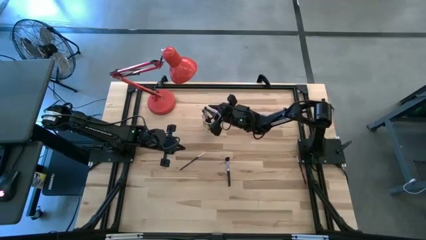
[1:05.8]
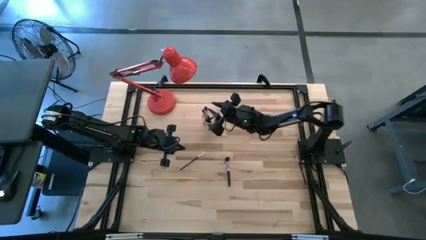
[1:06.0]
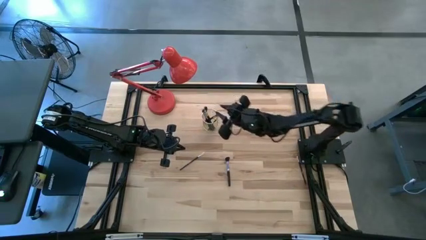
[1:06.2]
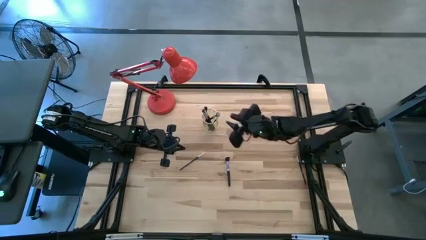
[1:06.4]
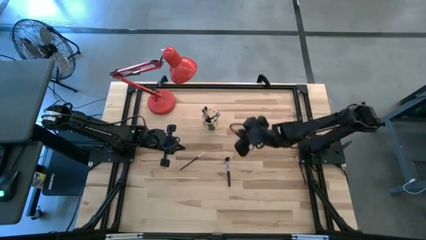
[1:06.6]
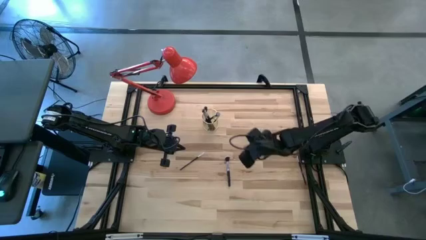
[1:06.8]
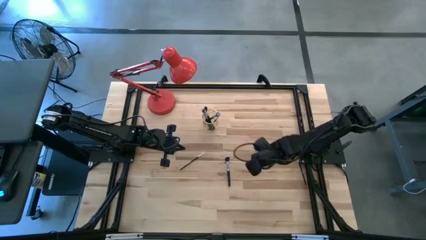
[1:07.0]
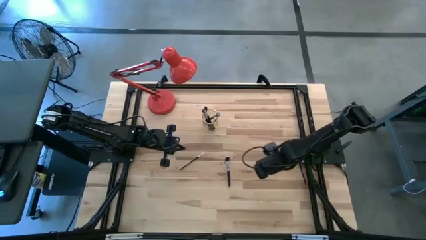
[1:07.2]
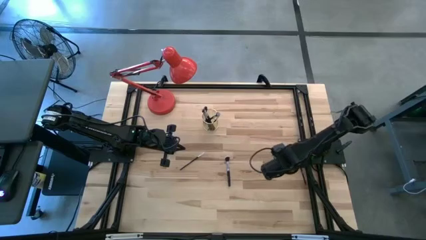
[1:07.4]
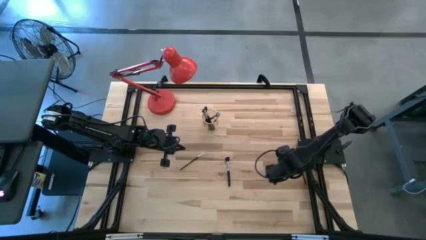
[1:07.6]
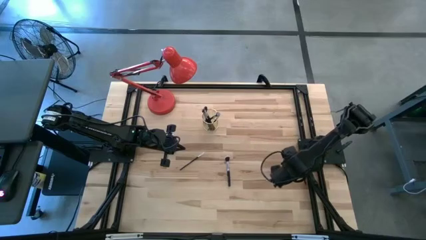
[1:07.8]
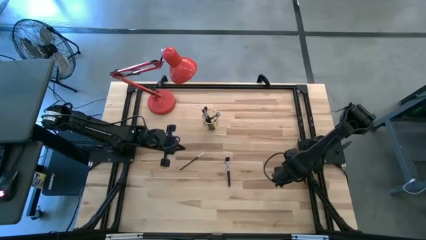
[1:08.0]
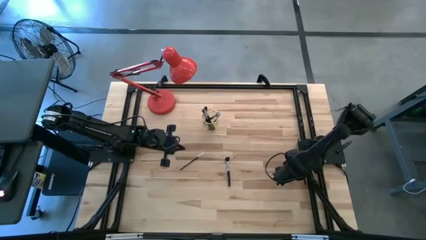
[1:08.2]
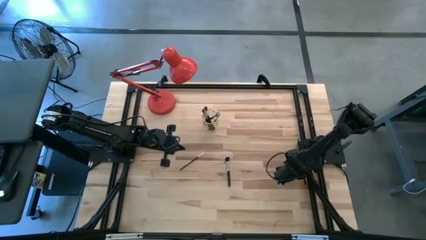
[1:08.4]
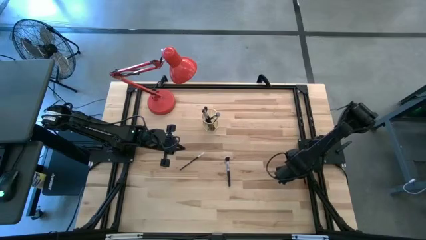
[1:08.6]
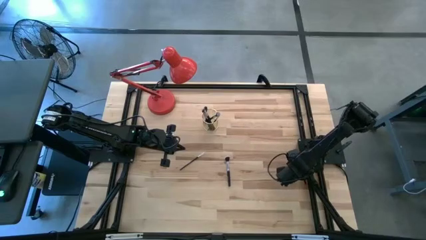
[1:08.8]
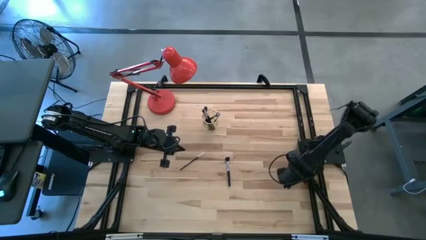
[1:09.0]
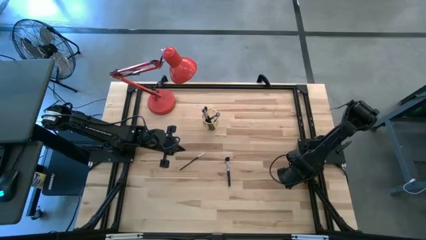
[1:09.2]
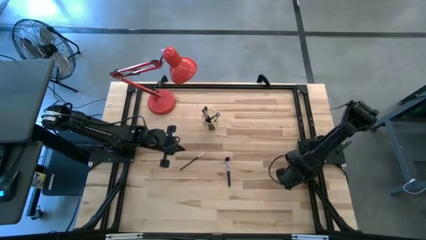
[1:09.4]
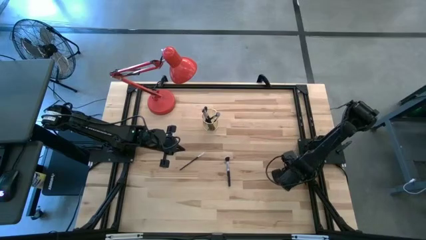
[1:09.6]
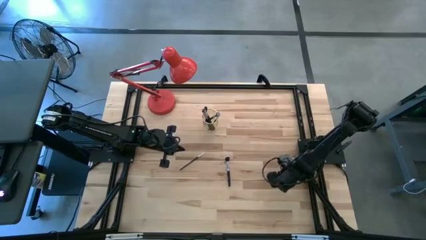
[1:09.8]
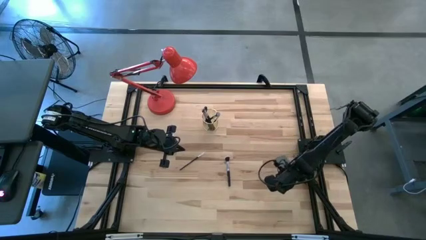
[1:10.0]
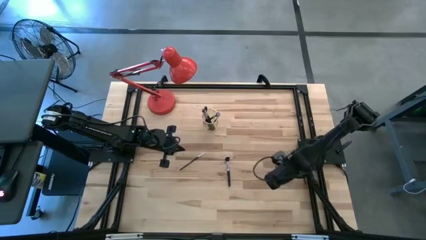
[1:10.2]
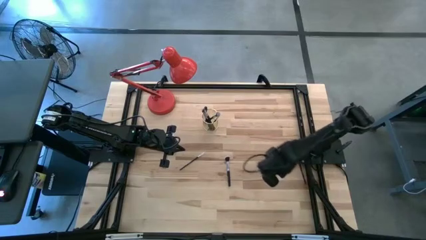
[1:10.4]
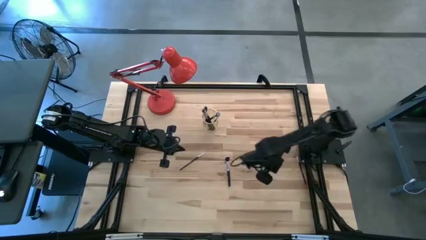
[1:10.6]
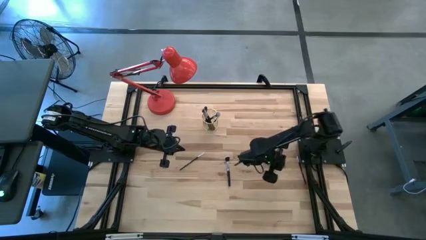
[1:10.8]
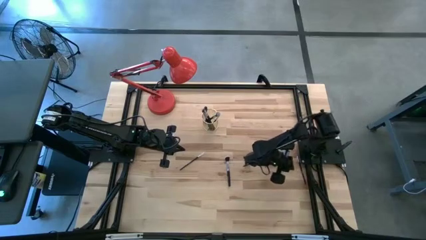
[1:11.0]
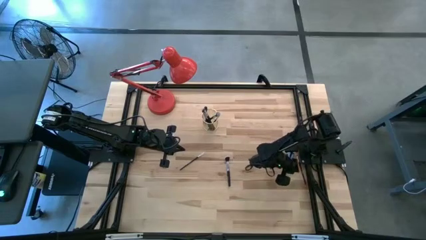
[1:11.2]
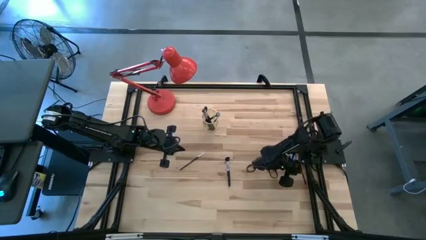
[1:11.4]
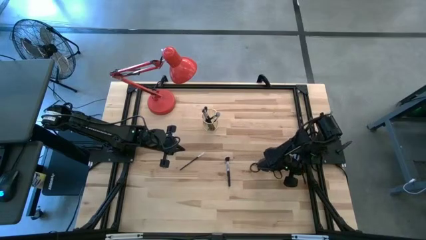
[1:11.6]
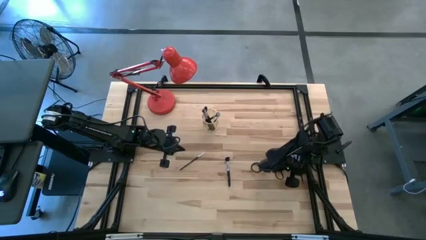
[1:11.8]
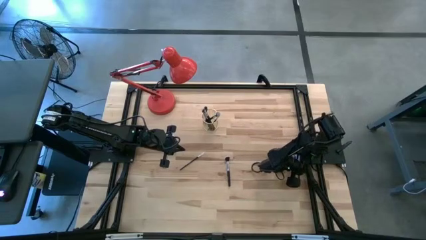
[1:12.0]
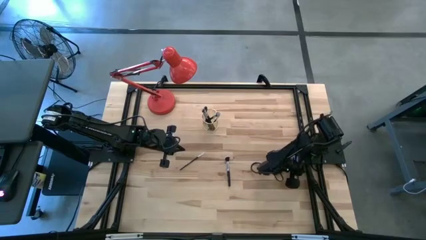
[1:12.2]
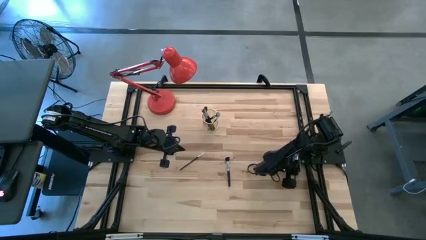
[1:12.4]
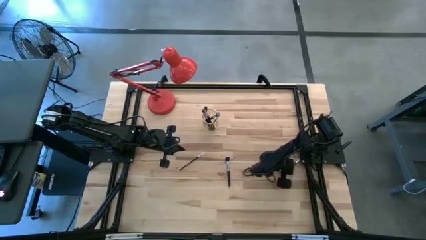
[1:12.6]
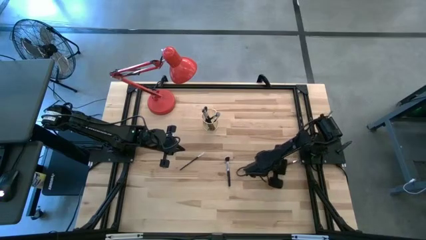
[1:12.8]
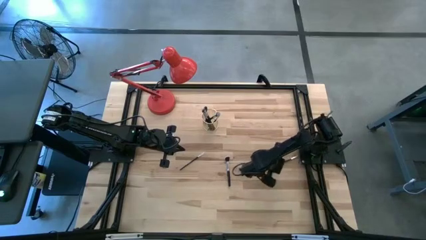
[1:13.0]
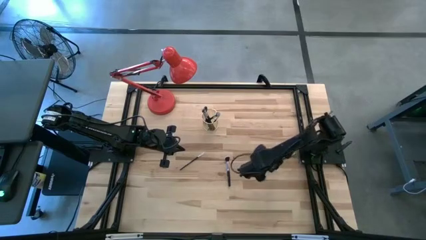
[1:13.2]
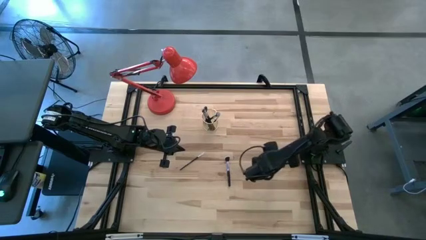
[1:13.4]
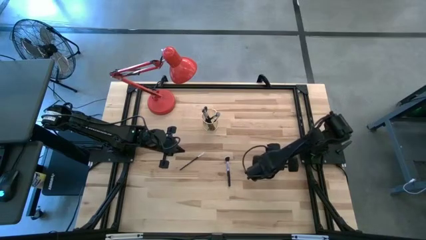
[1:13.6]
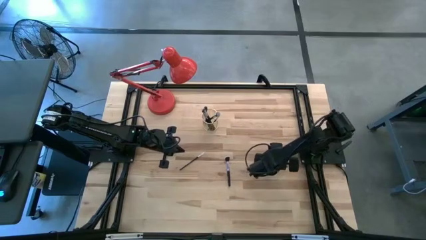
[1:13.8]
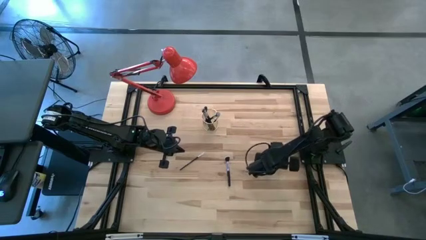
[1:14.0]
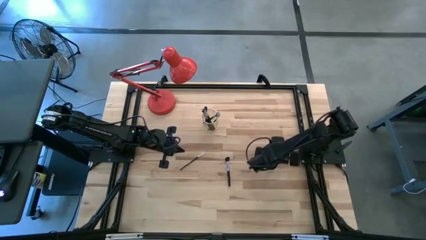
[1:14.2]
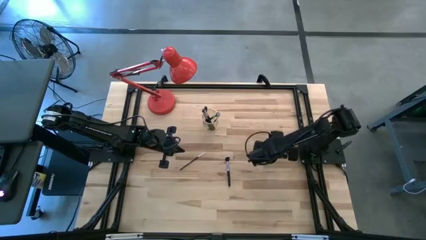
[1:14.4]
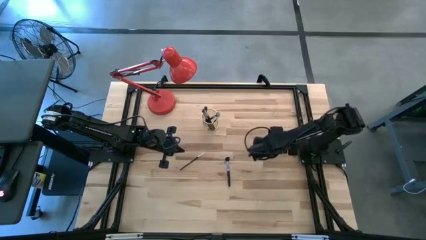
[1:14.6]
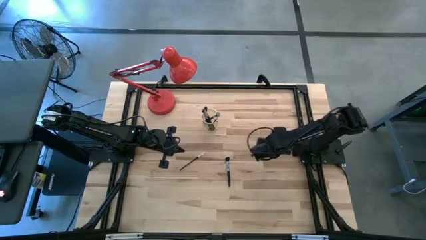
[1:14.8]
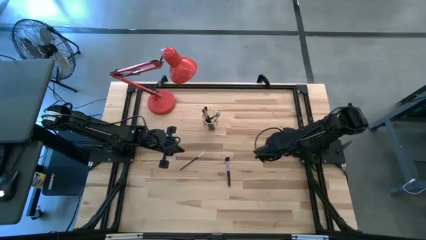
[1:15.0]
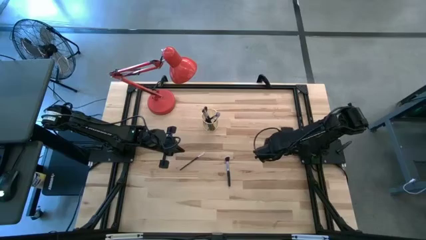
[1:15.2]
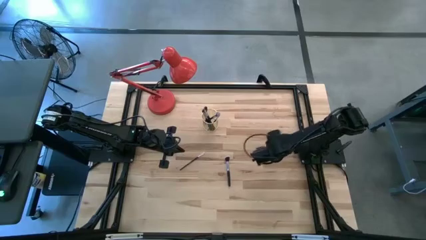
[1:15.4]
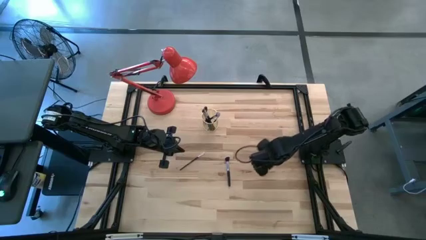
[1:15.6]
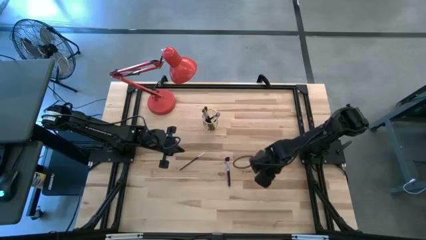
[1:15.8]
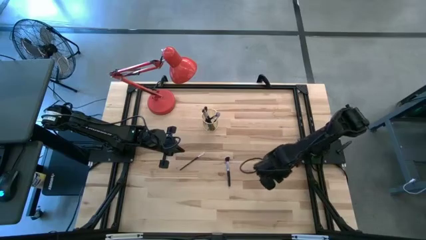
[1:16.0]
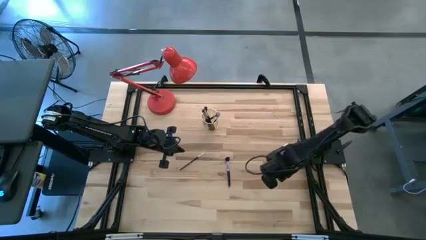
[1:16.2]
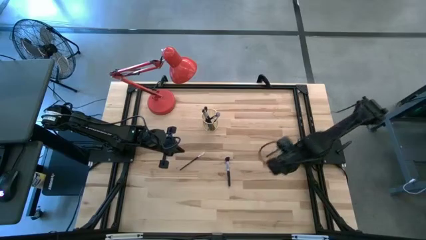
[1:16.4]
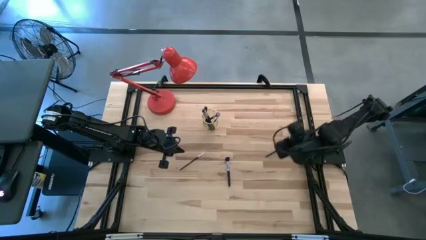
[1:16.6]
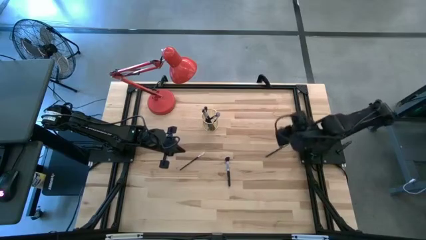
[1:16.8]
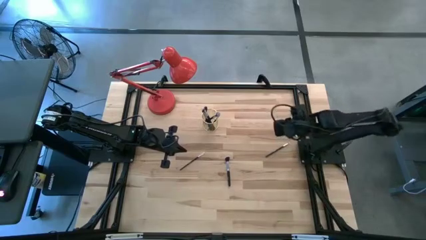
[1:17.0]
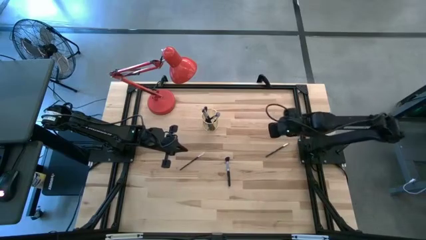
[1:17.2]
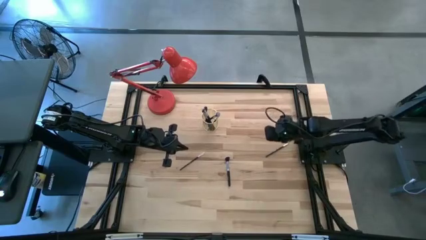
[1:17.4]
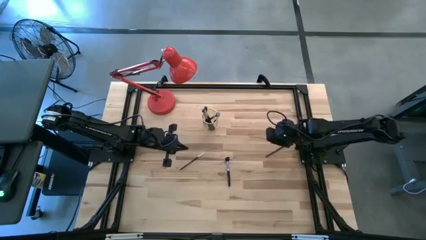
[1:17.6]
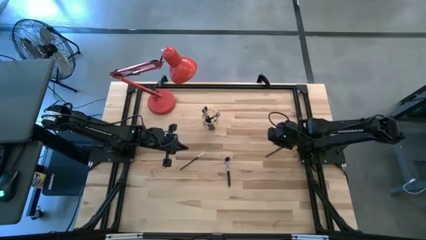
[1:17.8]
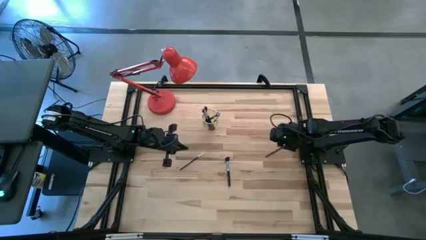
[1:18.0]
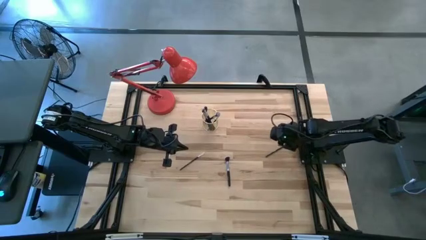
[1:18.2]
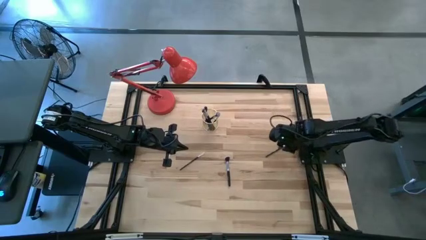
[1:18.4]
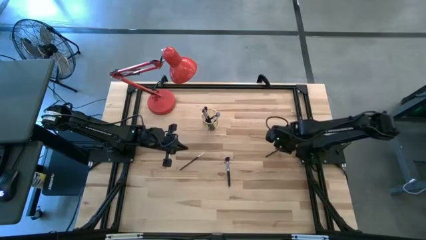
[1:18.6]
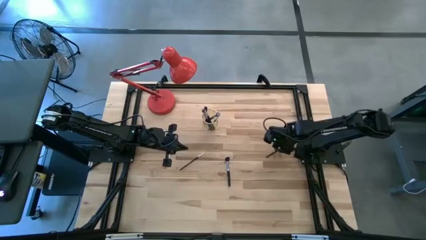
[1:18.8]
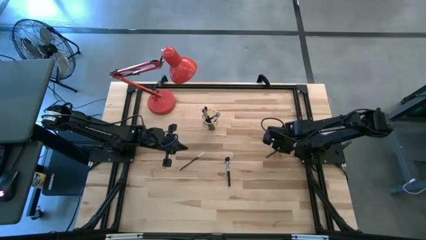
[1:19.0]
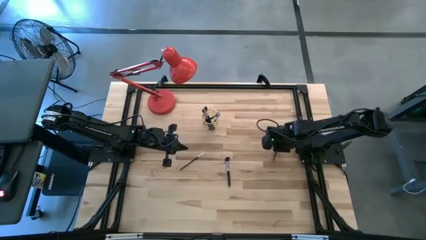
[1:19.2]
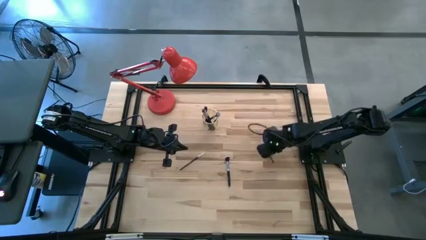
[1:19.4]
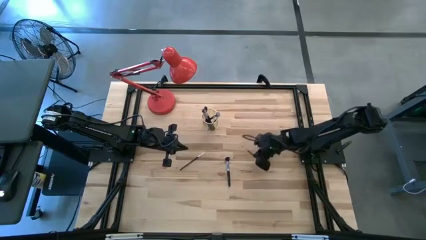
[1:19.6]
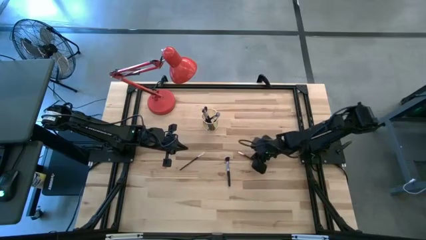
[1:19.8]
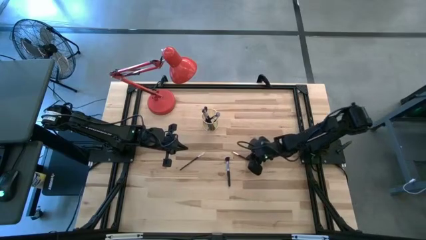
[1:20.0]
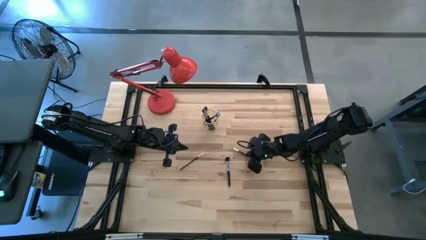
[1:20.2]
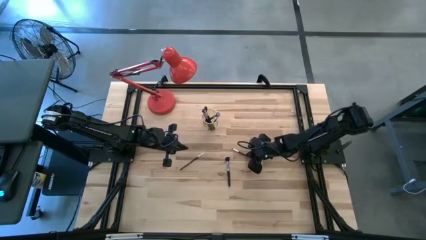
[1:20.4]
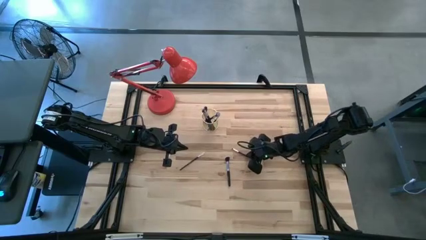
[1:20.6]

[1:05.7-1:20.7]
Task: Put items in baskets/containers
Put the black eyeshadow brush into the gold pen holder
